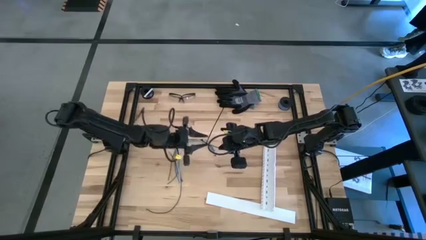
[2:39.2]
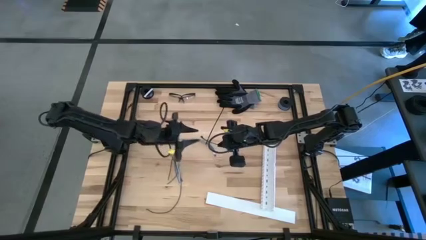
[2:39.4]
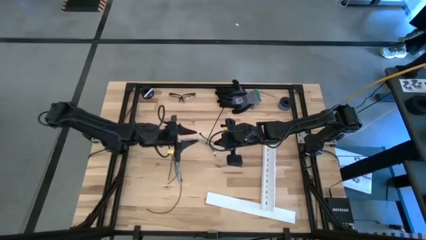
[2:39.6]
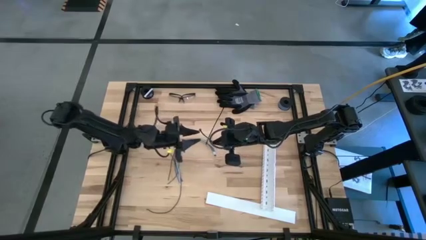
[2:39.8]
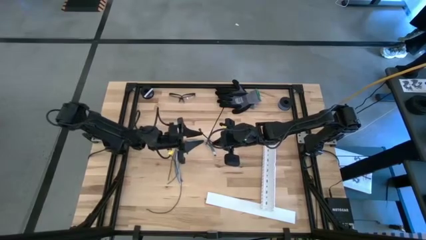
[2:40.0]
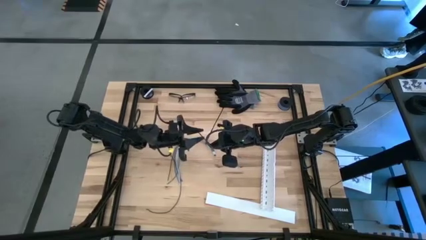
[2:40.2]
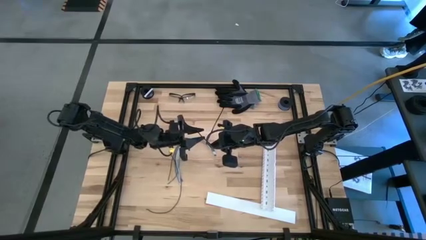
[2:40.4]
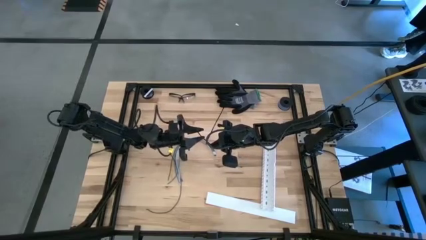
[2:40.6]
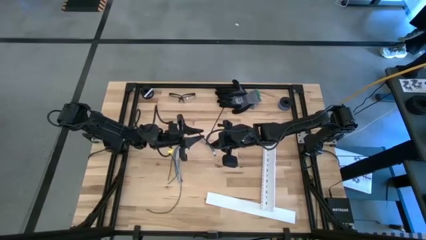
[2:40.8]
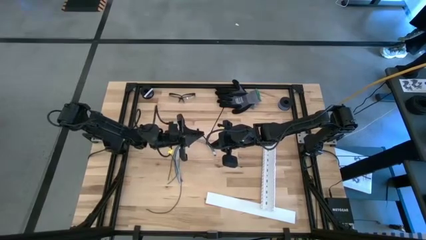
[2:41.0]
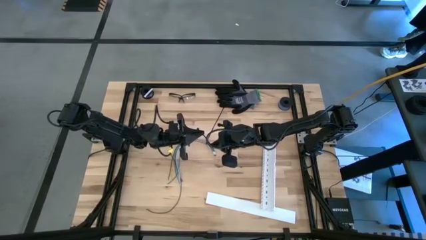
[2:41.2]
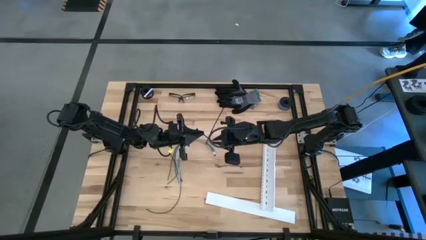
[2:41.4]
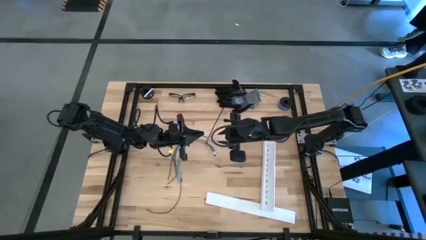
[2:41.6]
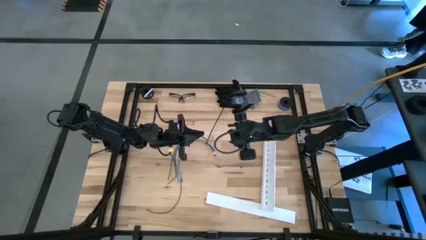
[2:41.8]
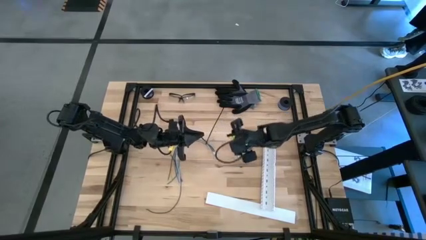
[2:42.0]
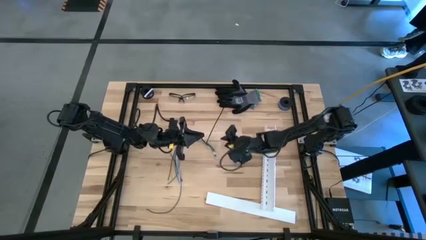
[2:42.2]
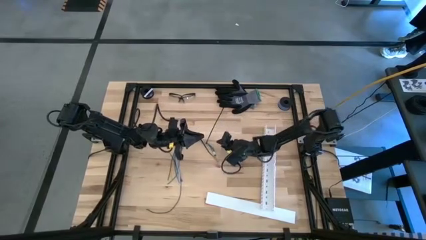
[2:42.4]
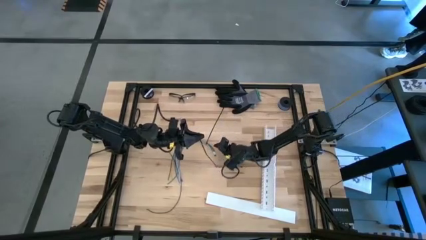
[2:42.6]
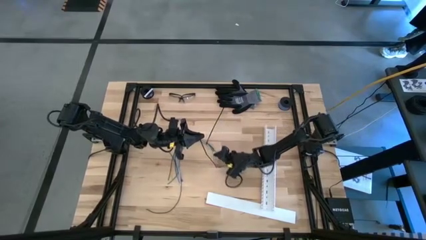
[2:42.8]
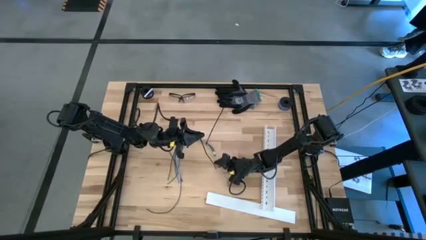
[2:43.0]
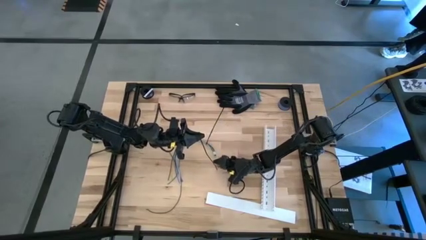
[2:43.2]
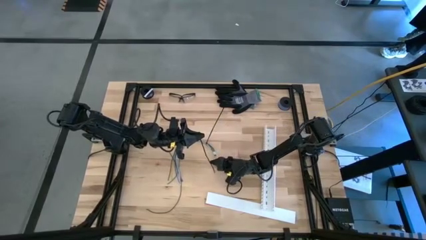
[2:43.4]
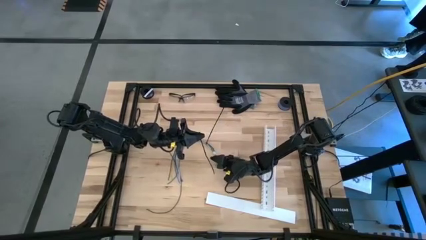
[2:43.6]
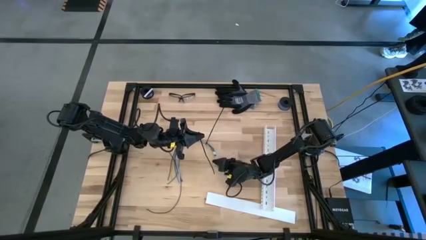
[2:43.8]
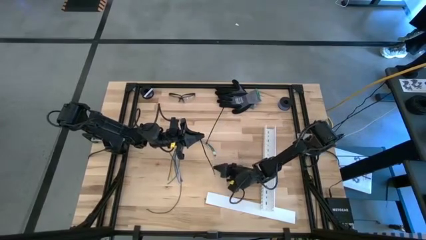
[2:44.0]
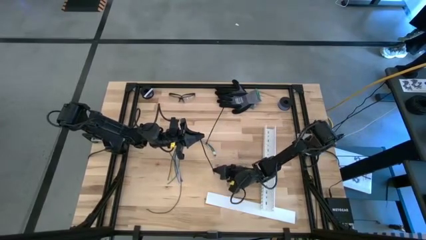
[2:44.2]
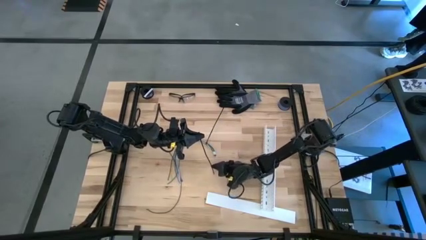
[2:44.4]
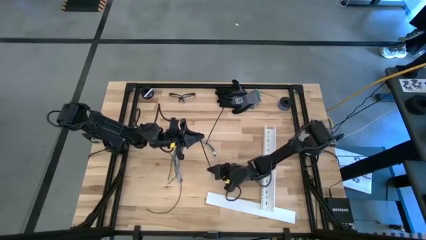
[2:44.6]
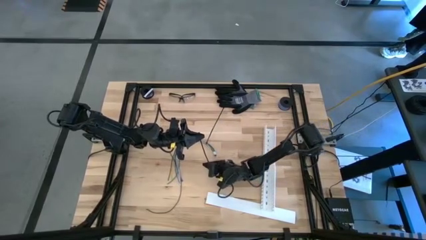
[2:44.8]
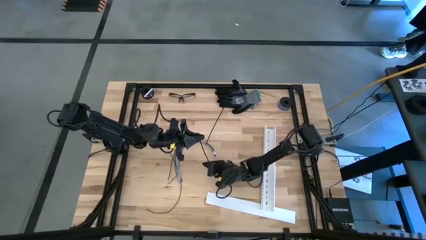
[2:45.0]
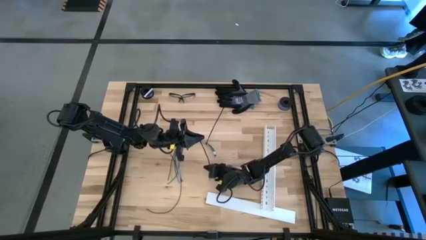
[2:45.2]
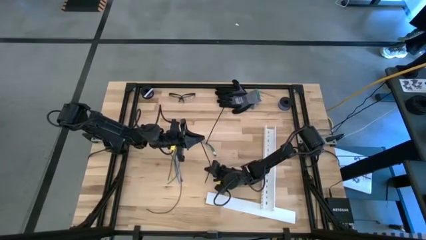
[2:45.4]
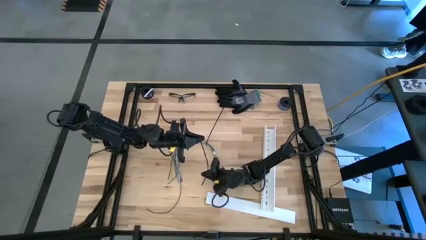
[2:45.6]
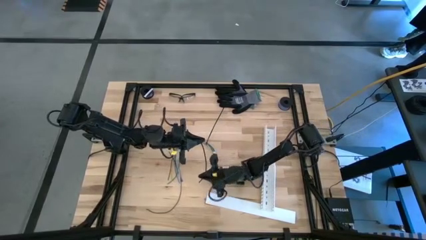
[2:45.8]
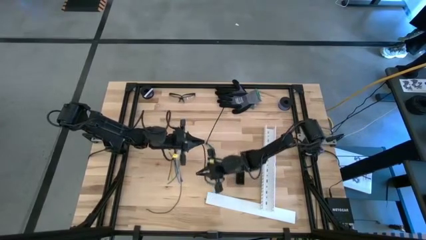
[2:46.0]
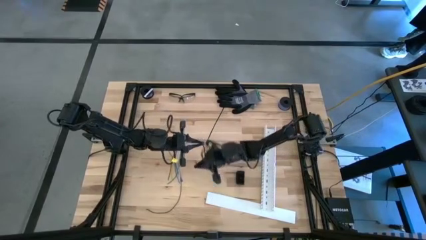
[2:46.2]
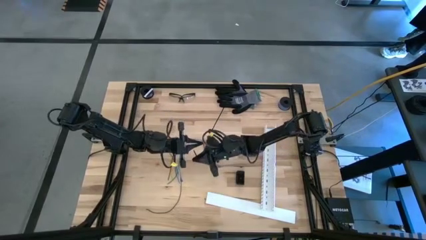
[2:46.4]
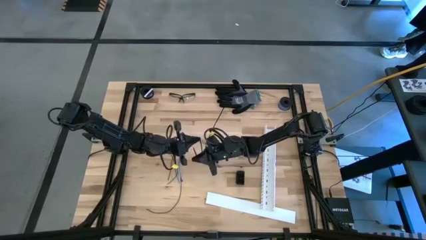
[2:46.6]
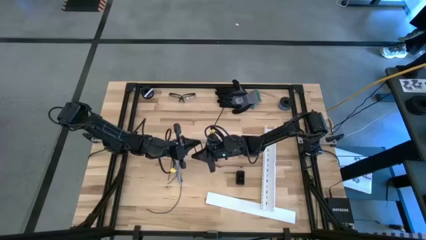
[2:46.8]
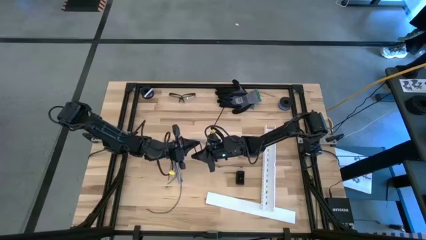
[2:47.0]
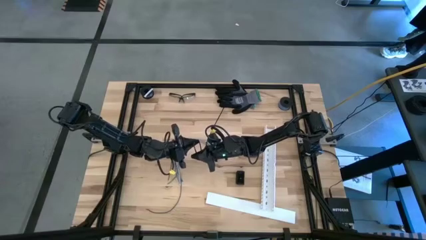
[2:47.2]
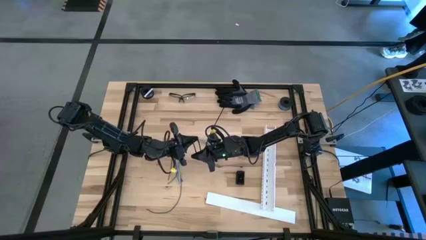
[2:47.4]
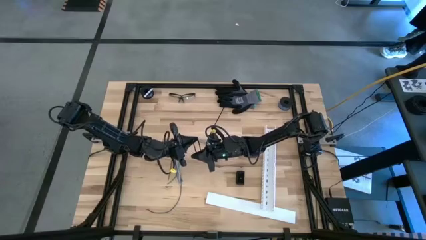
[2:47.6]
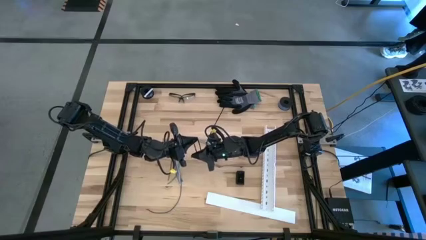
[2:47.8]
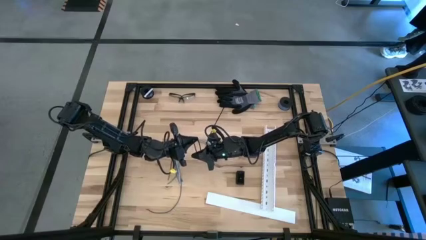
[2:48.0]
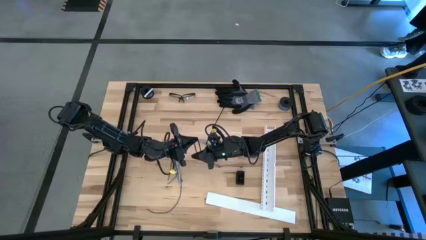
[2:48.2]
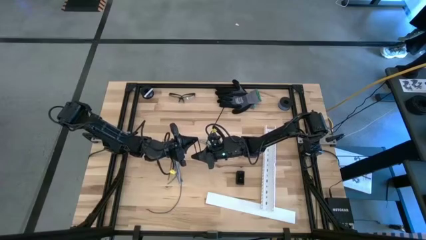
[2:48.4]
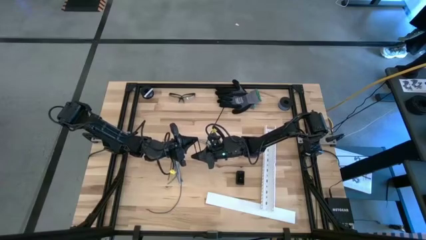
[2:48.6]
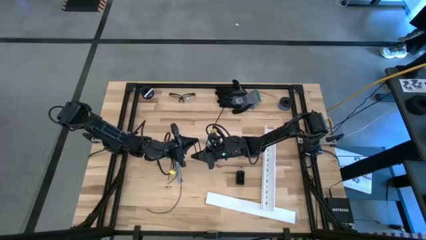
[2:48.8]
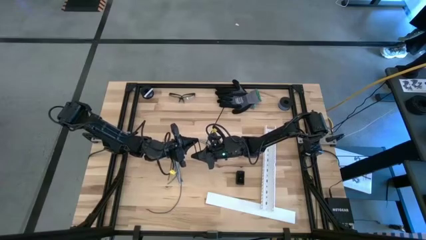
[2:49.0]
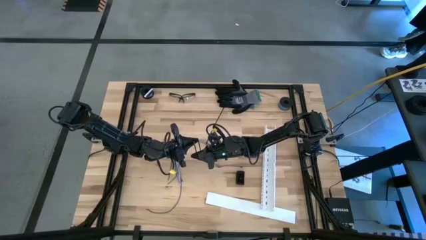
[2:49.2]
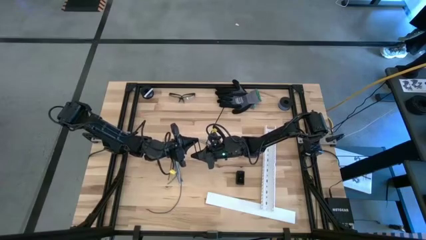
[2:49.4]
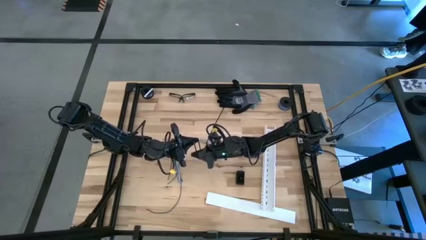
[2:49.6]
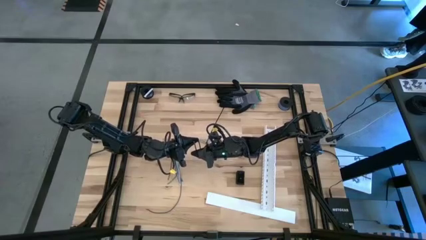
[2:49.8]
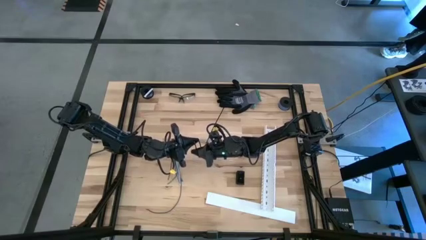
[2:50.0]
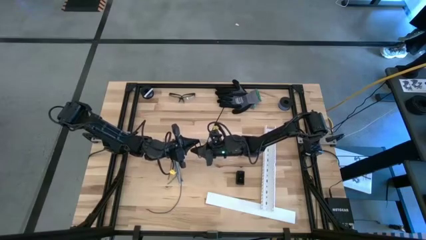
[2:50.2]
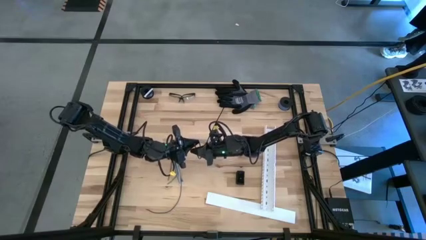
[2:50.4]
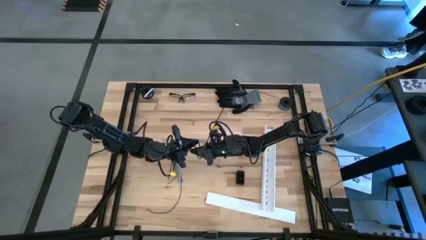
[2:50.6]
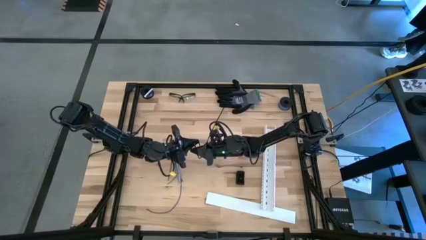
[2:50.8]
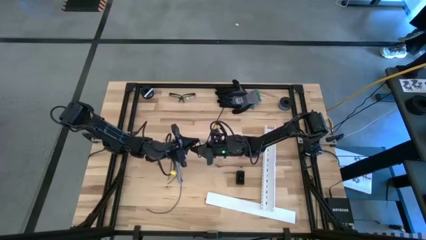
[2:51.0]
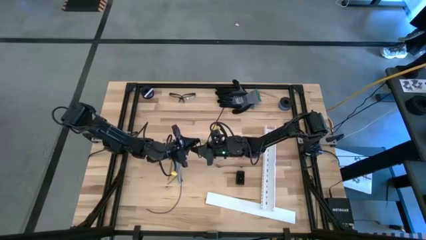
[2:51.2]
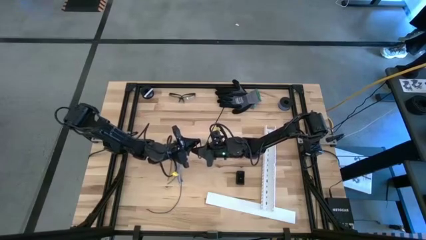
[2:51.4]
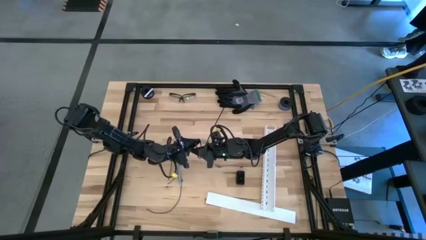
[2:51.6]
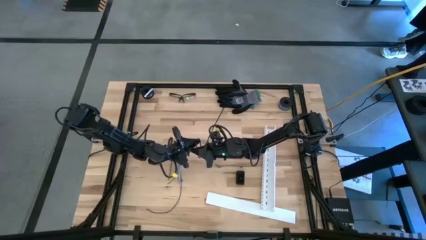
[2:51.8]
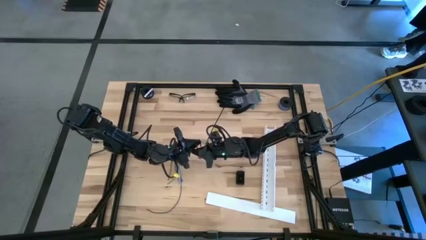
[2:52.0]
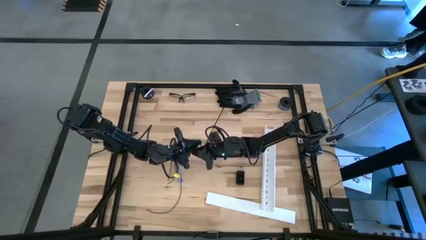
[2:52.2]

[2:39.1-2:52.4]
Task: Ziptie cables
Wrap the cable wires with the black zip tie

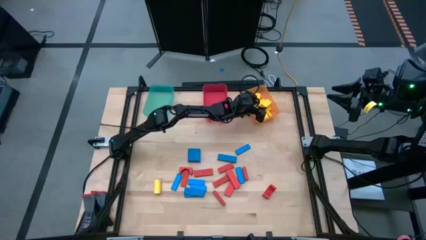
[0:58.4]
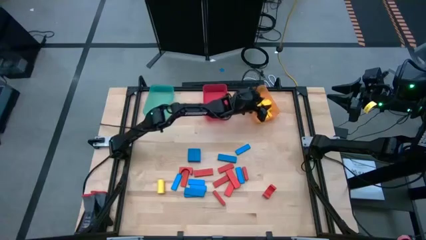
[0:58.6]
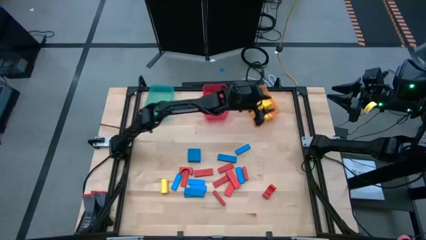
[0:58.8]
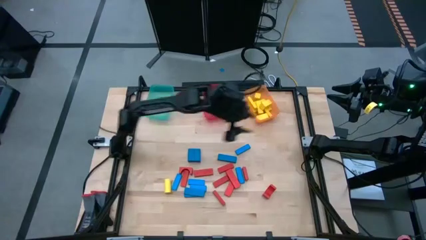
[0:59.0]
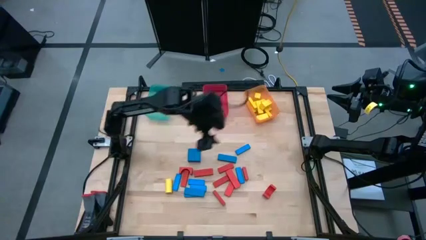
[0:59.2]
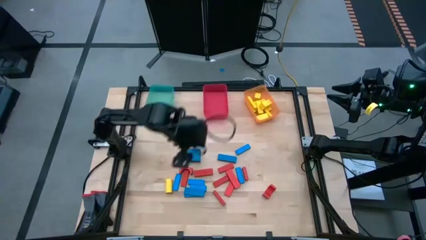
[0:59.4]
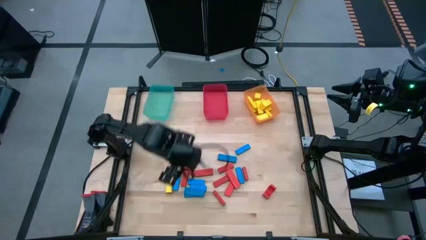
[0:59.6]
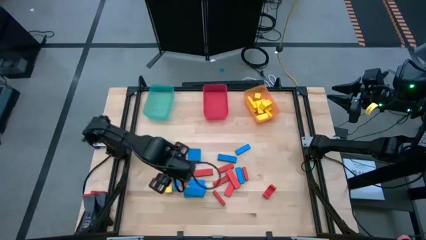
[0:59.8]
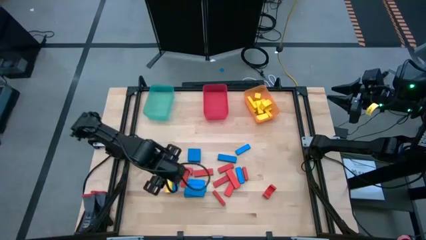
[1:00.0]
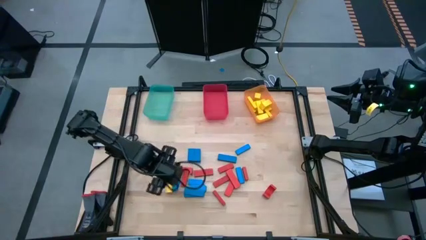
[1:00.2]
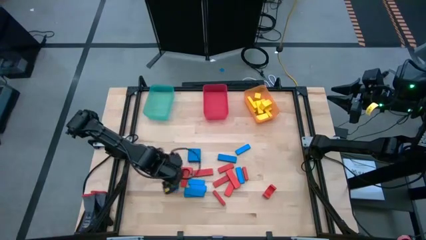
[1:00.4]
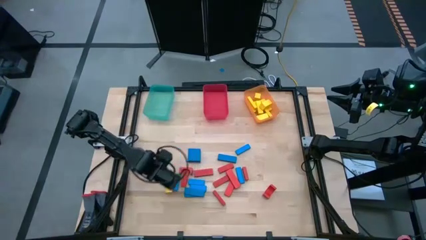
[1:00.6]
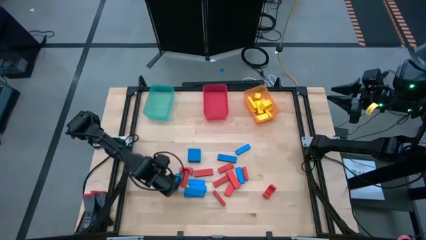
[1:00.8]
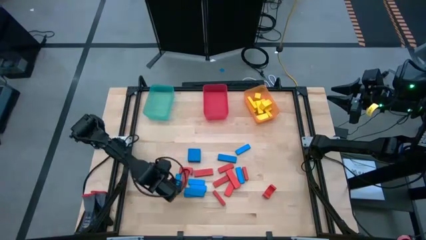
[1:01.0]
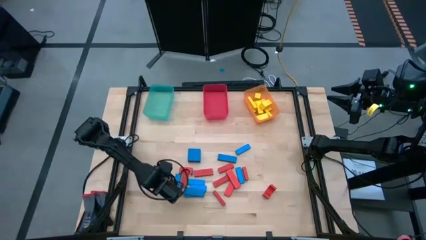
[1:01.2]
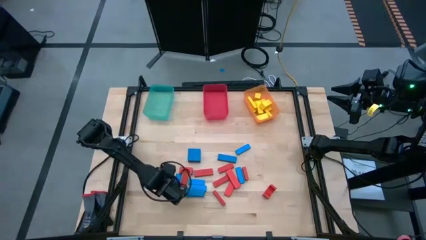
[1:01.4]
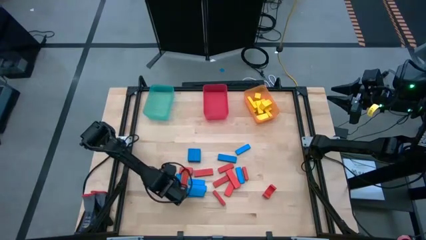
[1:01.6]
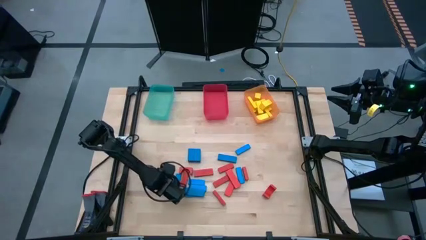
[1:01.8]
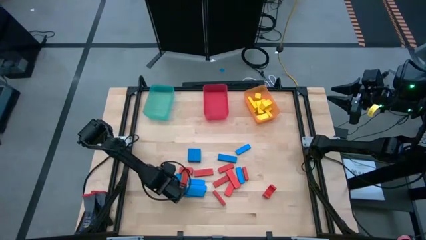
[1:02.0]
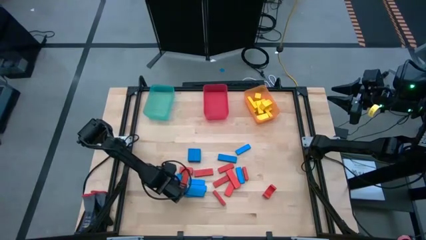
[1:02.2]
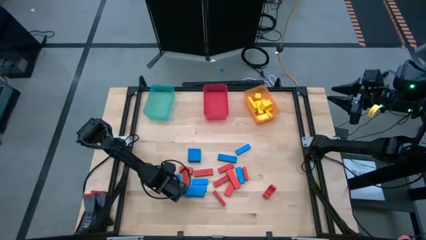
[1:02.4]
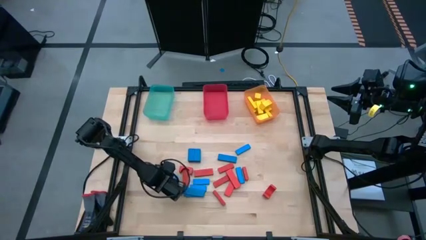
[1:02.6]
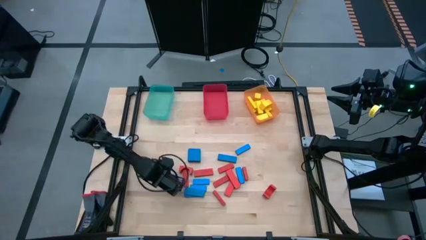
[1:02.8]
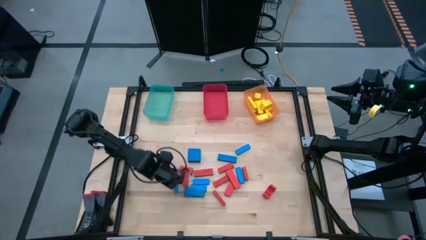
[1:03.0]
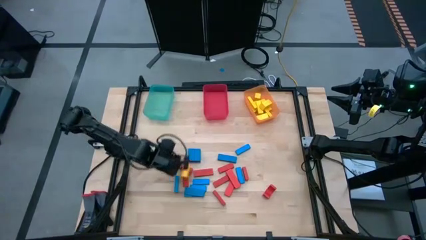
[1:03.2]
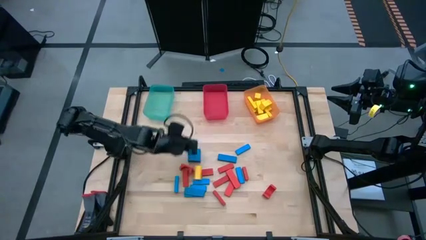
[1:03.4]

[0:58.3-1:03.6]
Task: Sort blocks
Put the yellow block into the orange bin
